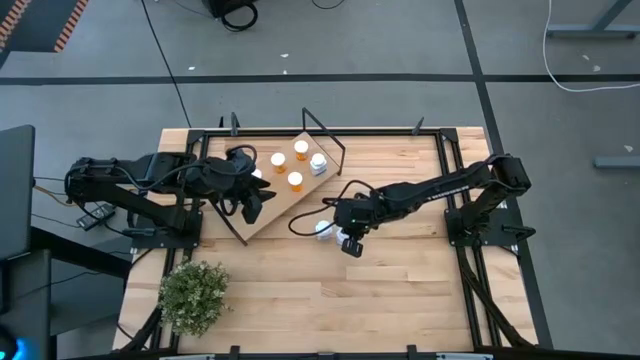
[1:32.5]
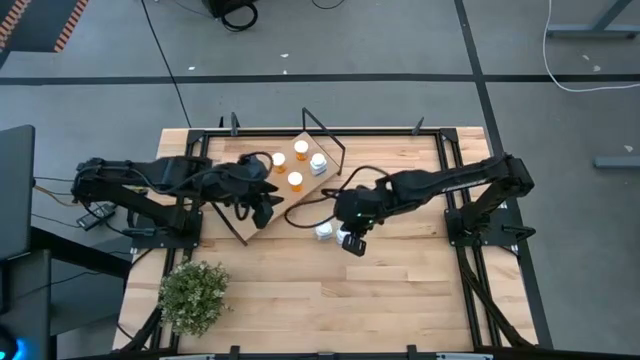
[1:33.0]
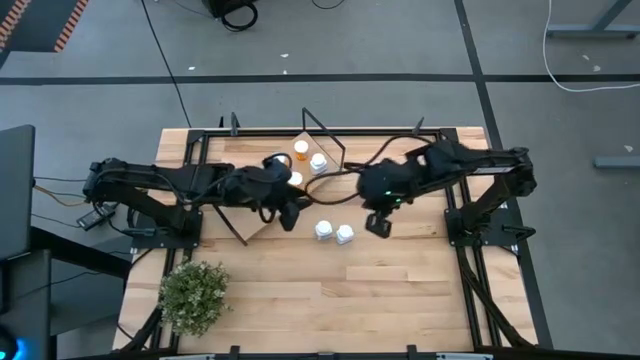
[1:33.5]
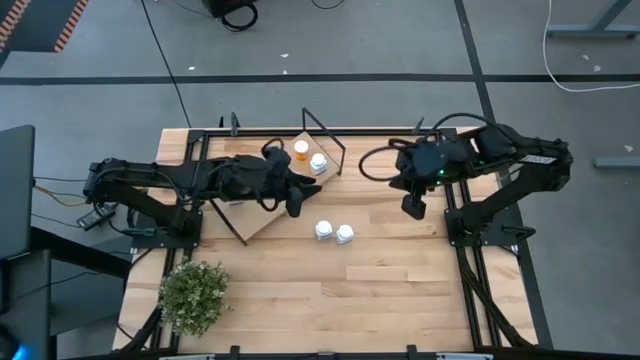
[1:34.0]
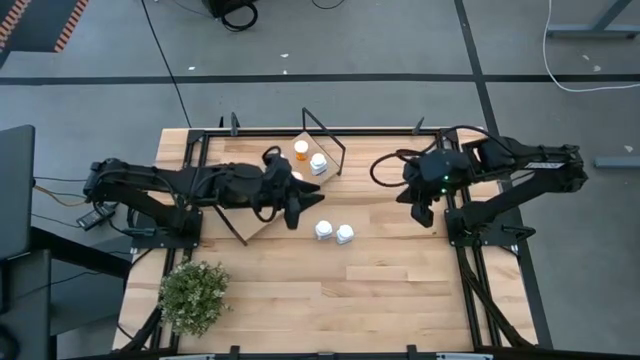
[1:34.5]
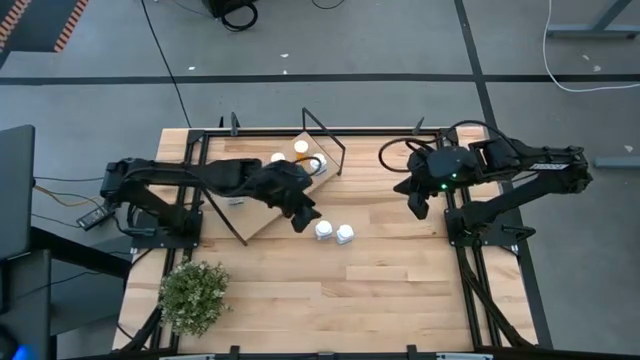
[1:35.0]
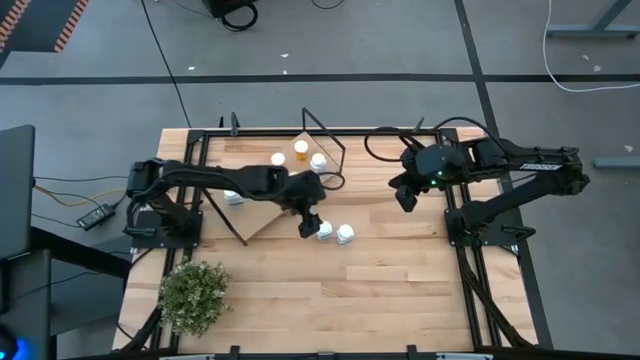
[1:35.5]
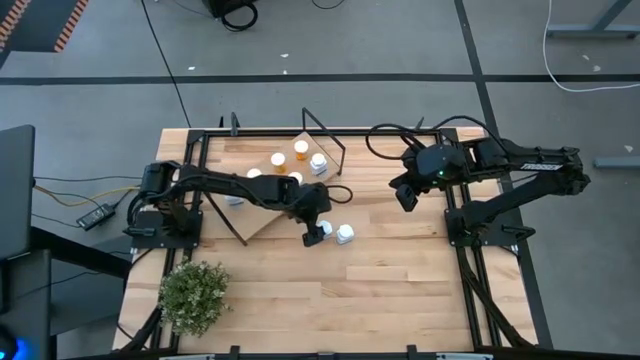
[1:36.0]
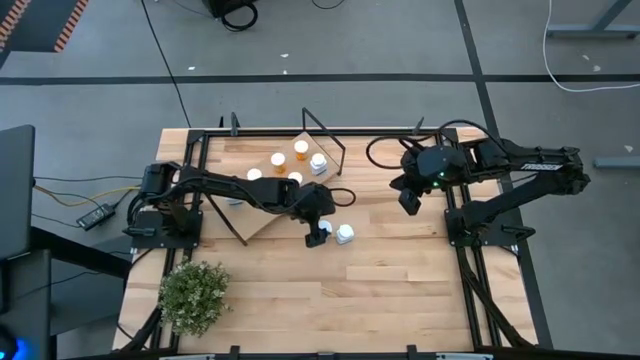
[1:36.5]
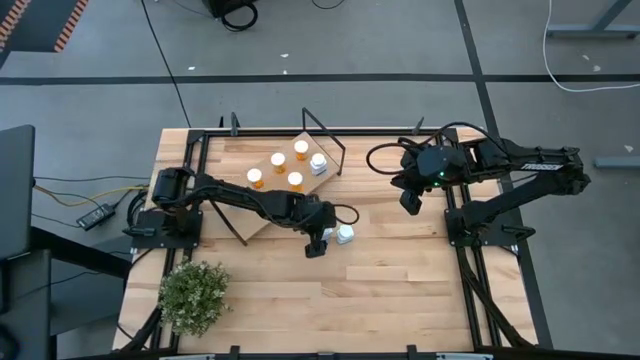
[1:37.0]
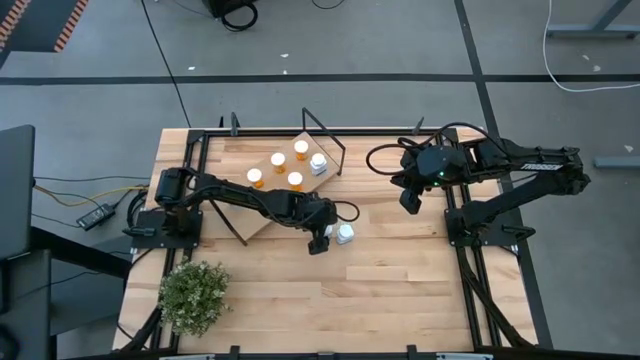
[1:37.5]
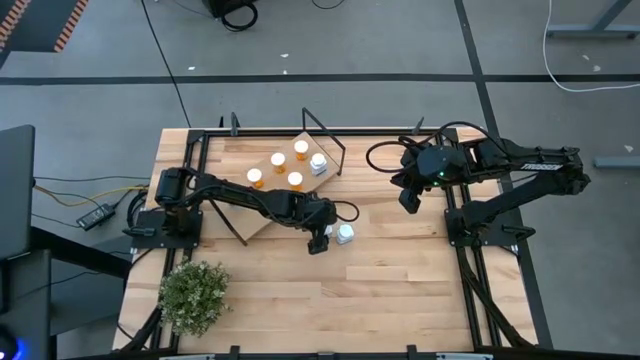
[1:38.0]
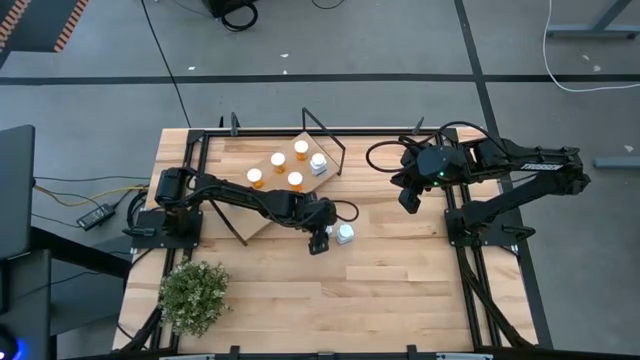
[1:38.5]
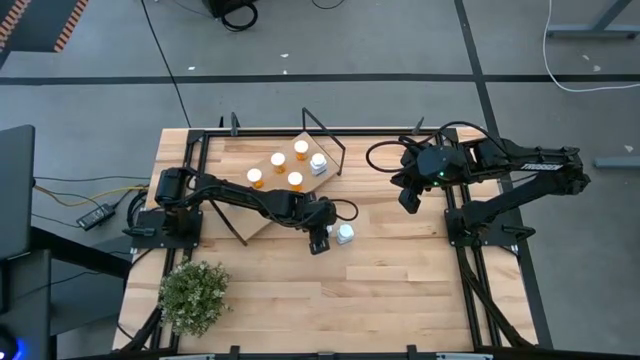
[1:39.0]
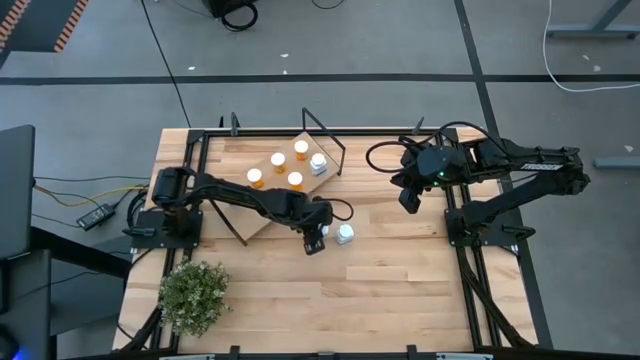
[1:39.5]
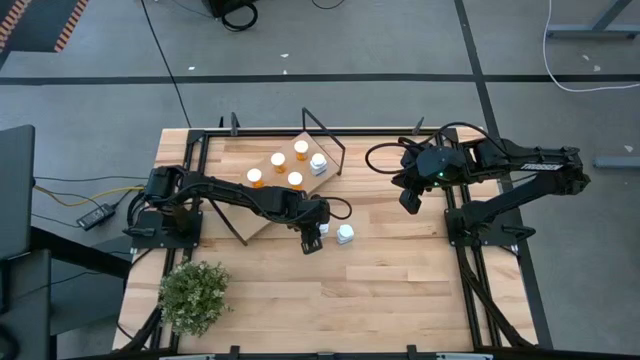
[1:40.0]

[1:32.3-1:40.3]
Task: Pick and place medicine bottles onto shelf by color
Put the white pill bottle on the shelf

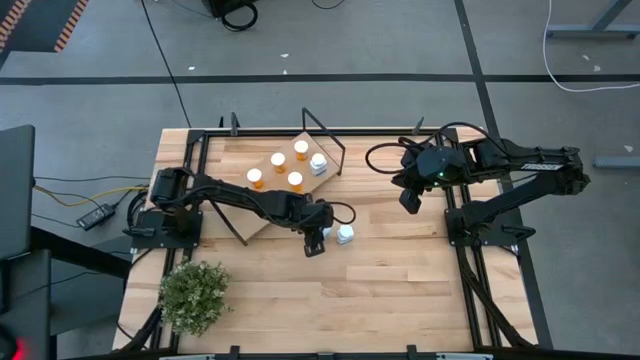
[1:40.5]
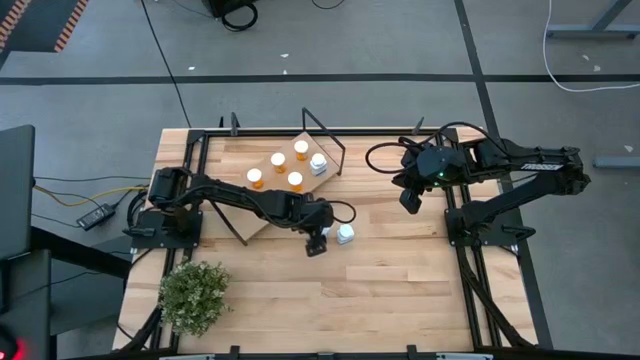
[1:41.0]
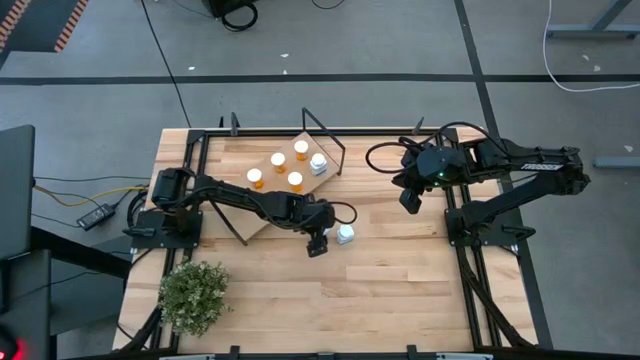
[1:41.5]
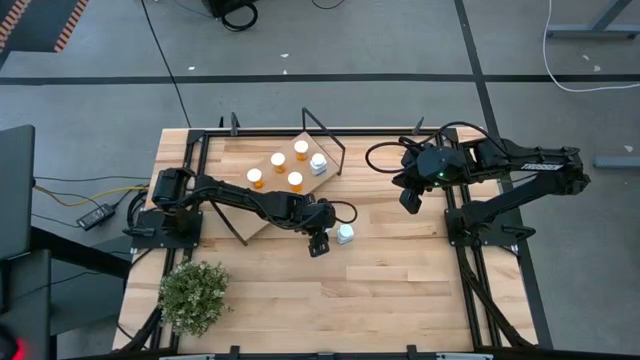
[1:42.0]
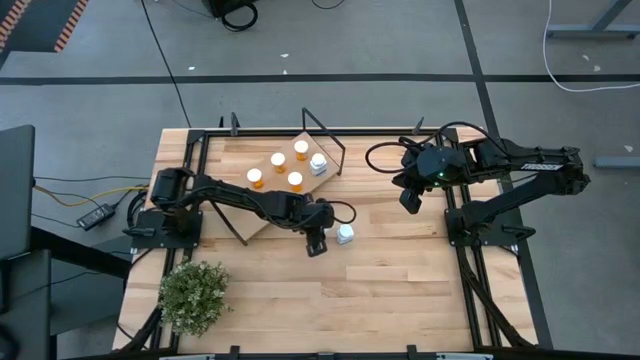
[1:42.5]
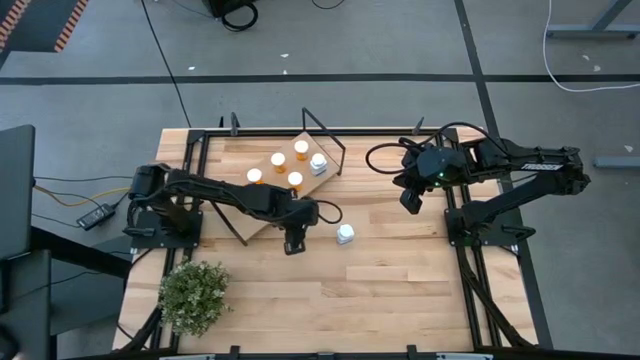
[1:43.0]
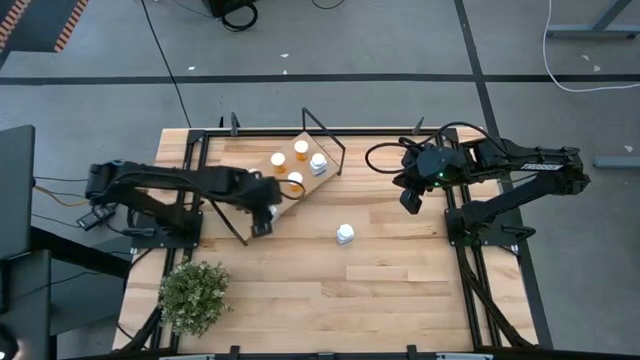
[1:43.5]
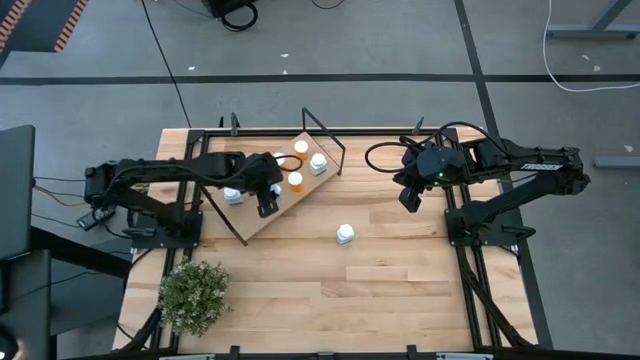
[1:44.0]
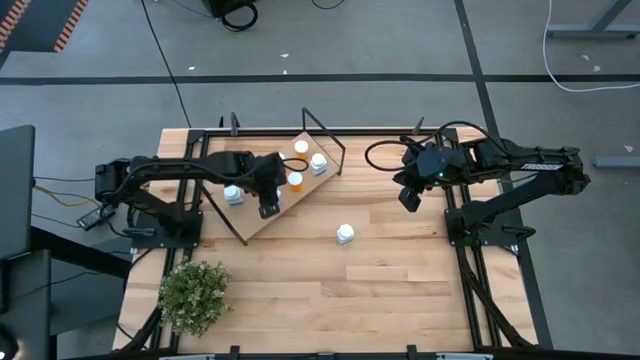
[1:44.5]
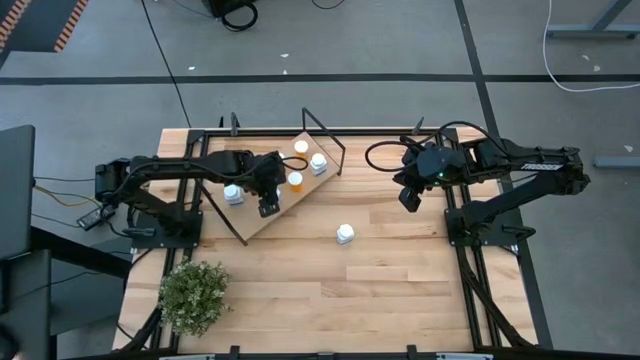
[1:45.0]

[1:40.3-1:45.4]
Put the white pill bottle on the shelf

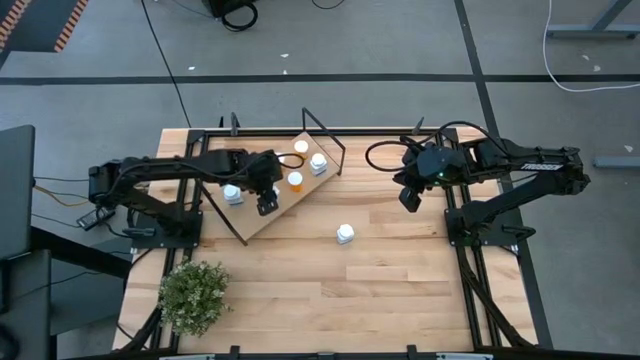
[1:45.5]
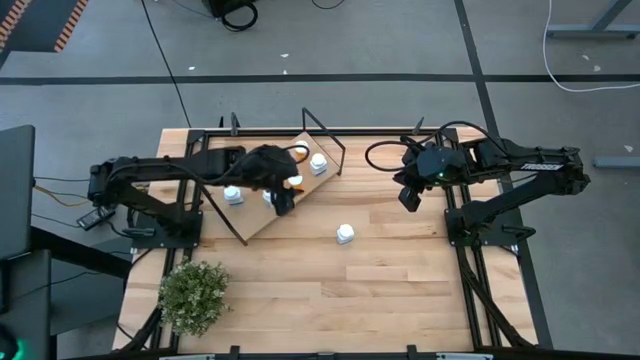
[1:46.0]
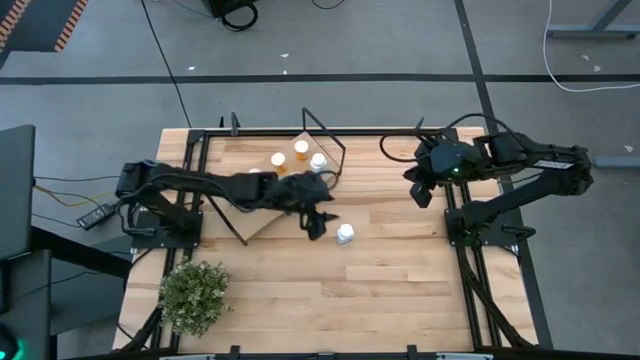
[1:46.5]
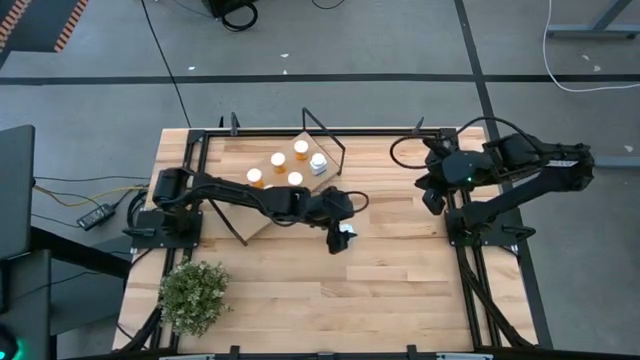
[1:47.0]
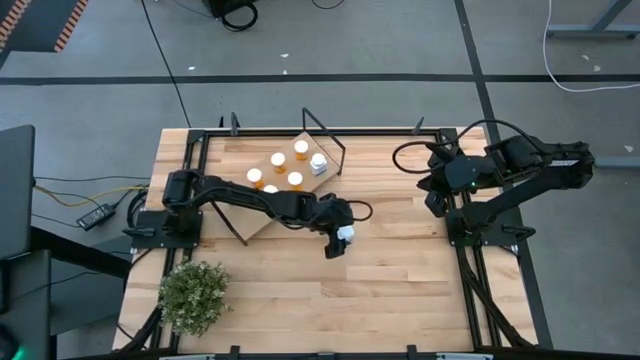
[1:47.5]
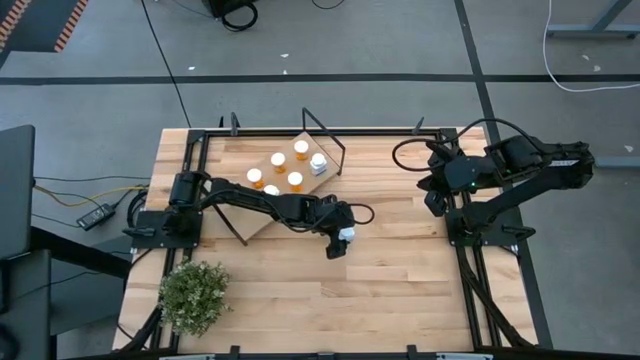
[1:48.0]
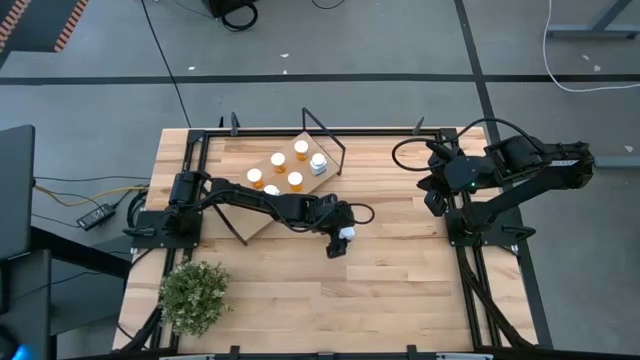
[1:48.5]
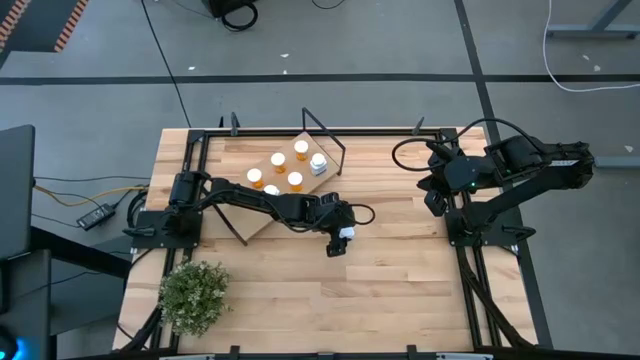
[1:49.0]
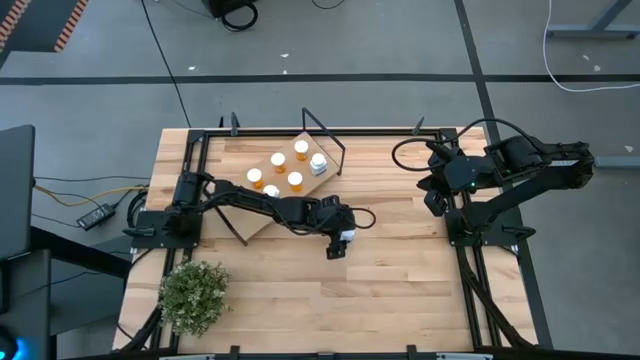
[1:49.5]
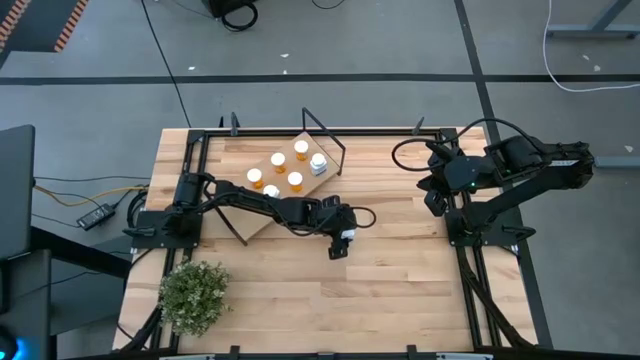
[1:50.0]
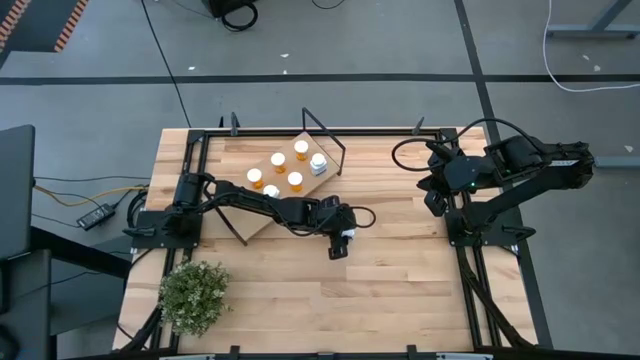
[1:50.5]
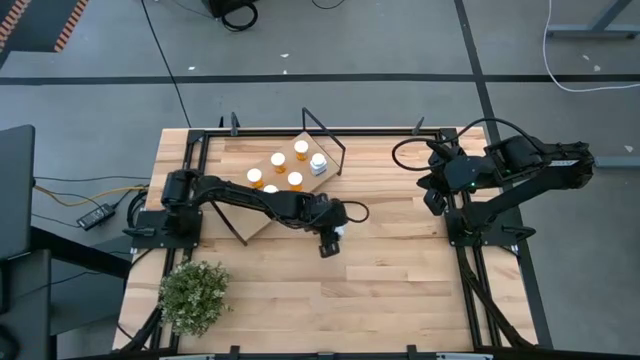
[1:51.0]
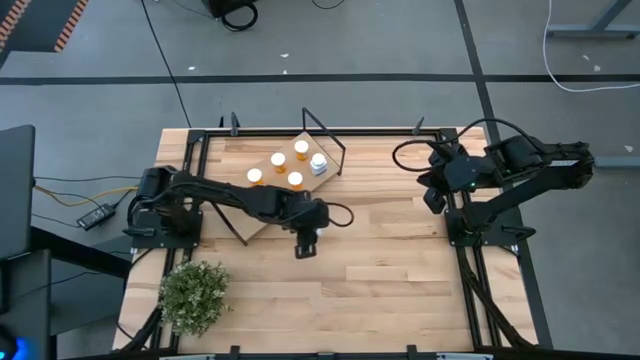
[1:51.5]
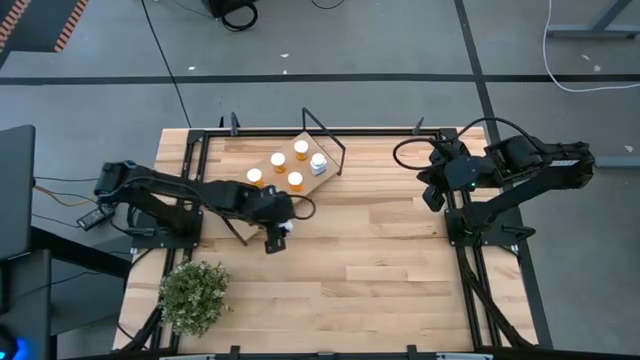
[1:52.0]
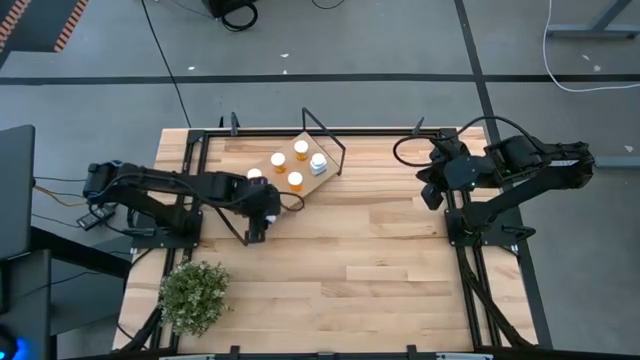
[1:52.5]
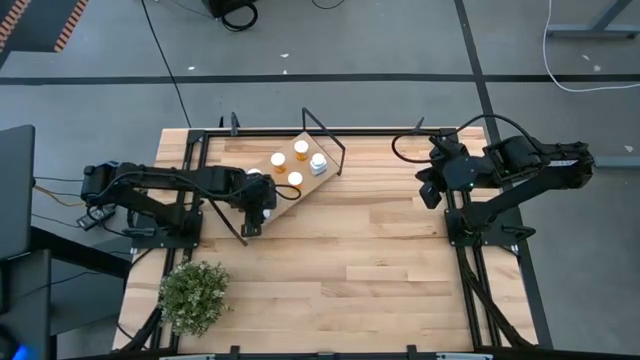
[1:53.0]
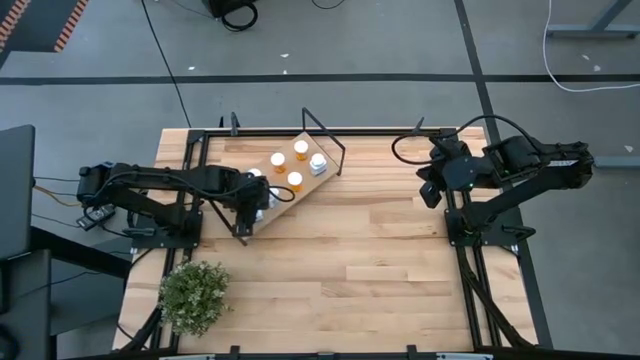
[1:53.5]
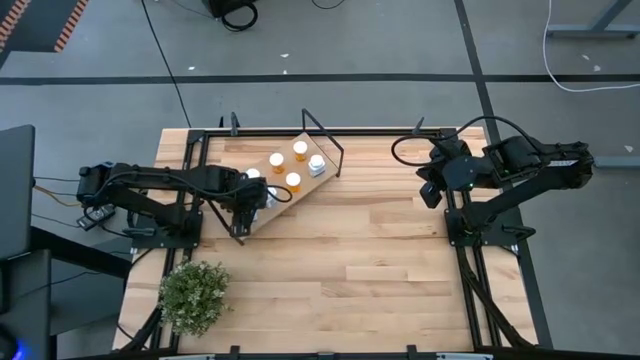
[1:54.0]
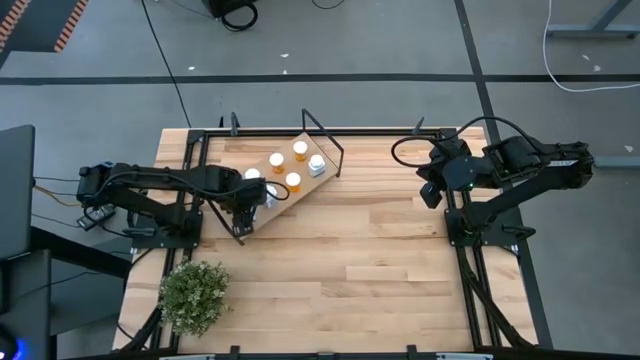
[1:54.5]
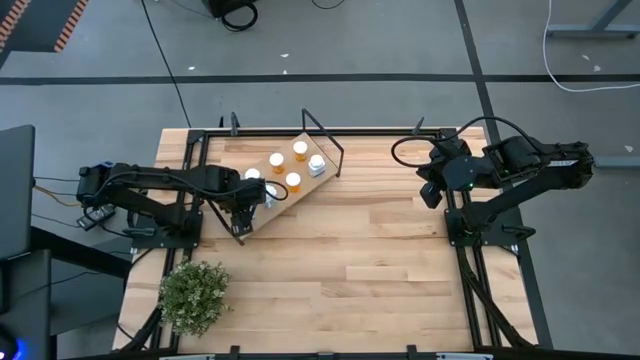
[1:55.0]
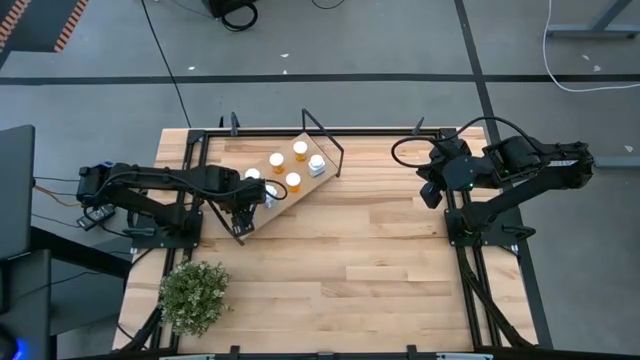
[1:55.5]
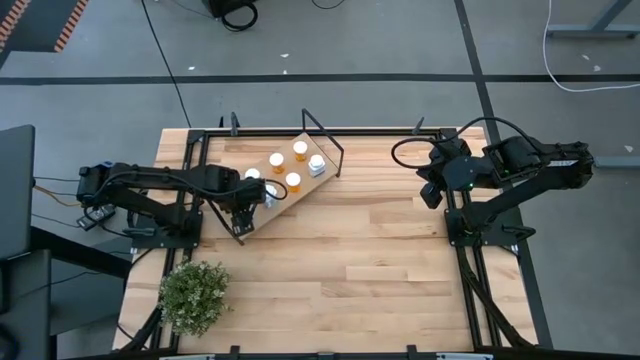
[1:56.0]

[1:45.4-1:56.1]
Put the white pill bottle on the shelf
